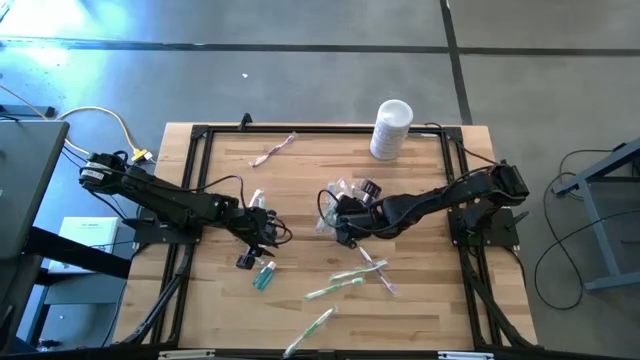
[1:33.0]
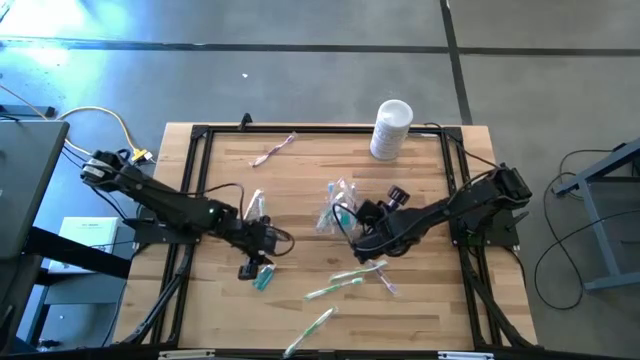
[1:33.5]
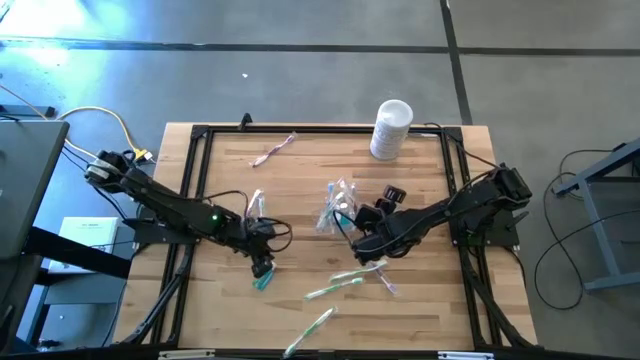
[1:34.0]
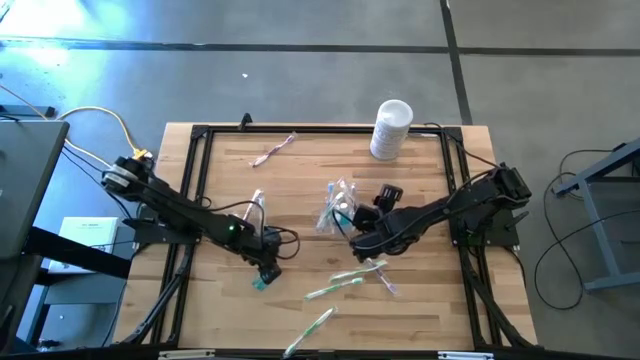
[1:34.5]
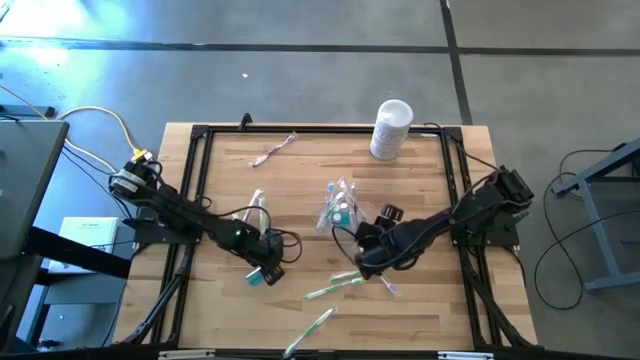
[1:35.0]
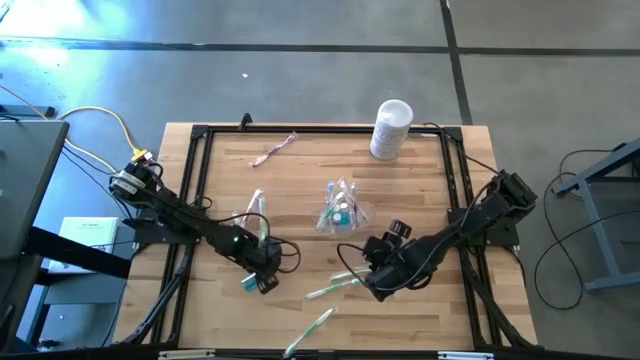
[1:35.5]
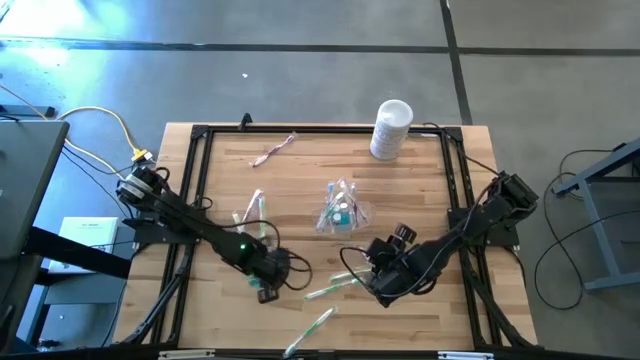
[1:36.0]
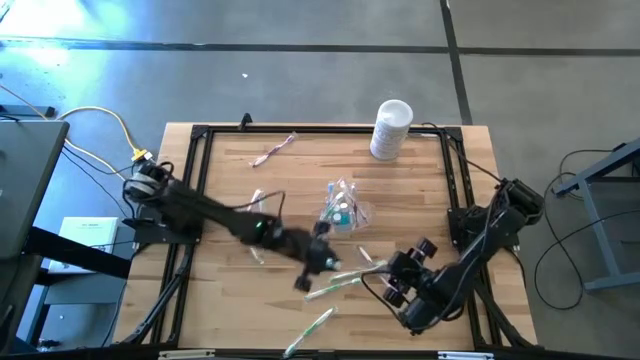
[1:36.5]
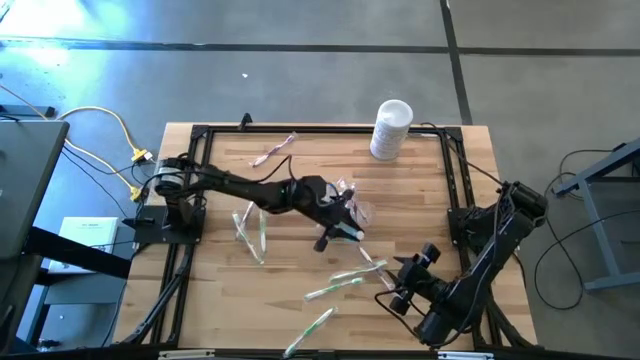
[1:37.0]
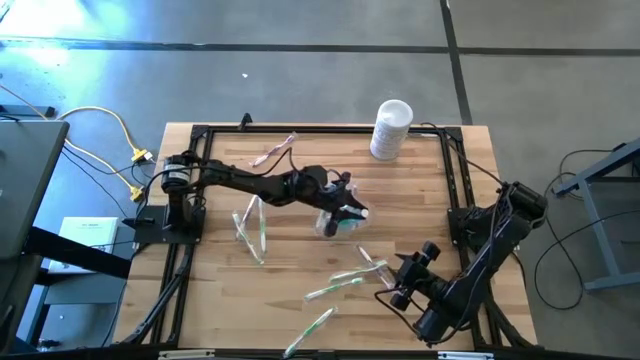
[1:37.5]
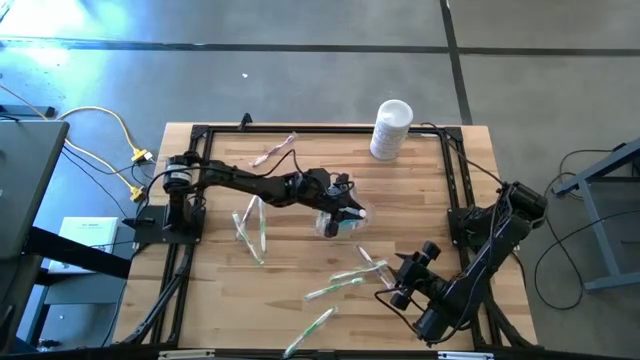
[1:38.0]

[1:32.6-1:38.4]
Task: Pick & Place toothbrushing station
Put the blue mouthwash bottle into the transparent organizer

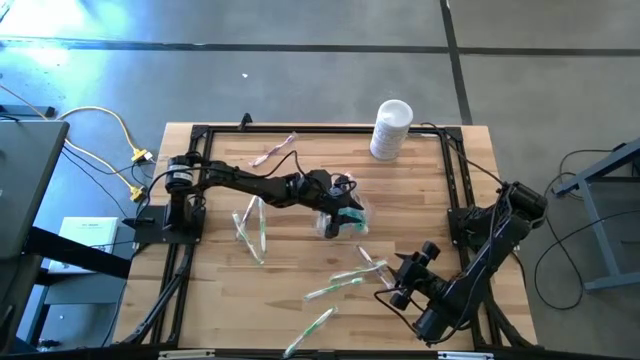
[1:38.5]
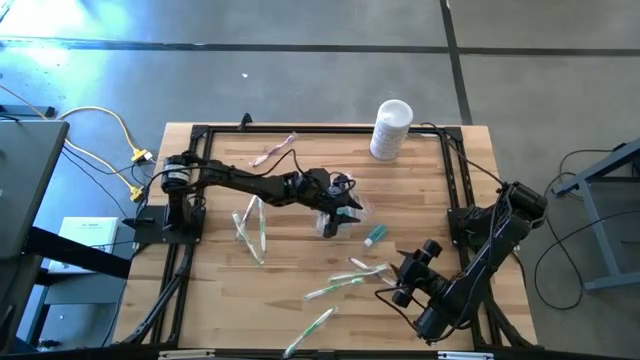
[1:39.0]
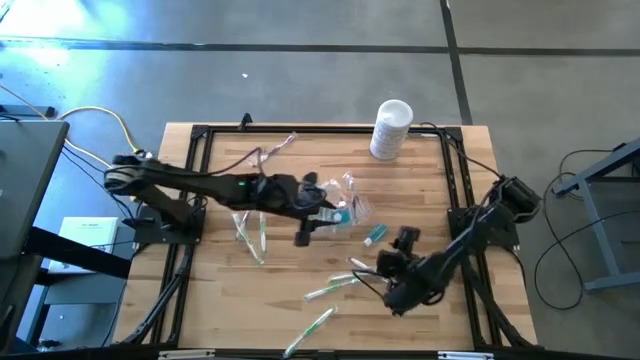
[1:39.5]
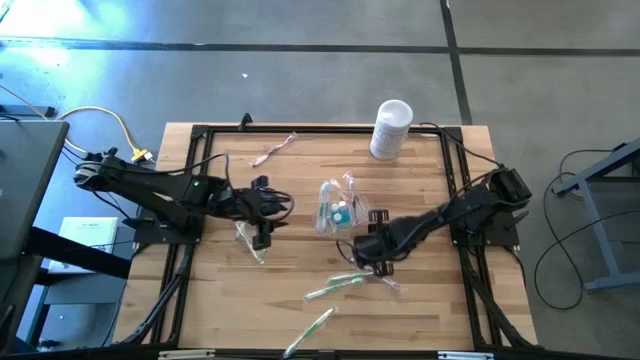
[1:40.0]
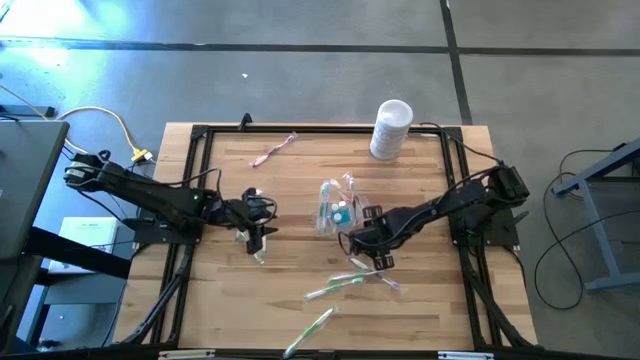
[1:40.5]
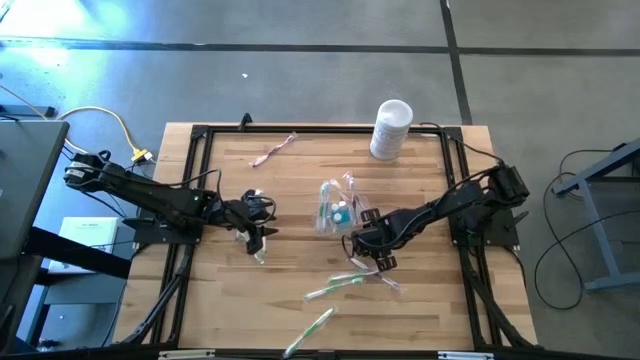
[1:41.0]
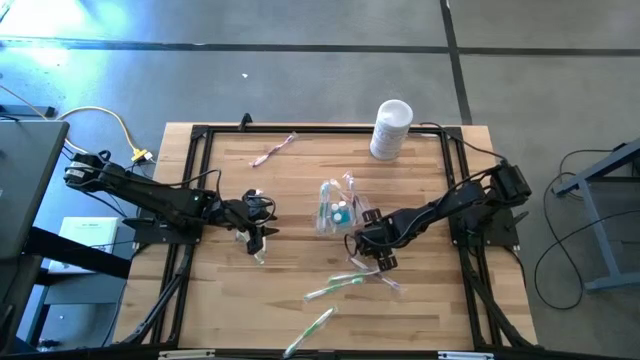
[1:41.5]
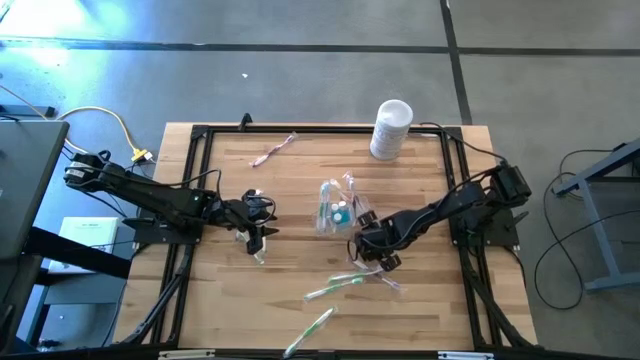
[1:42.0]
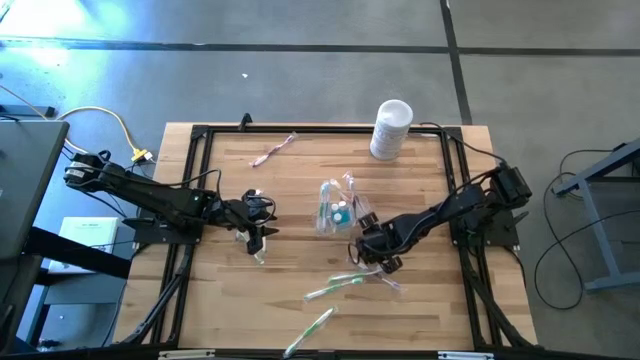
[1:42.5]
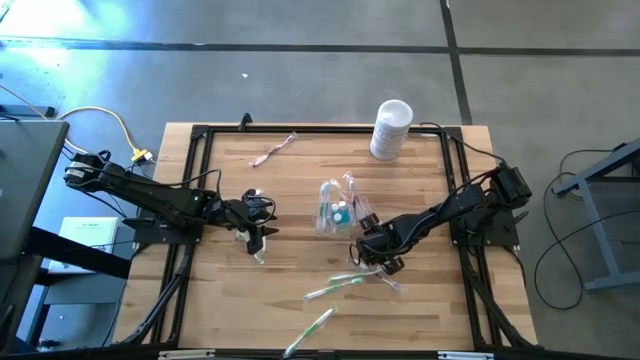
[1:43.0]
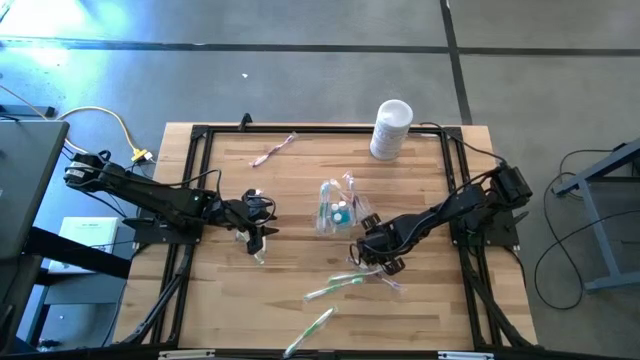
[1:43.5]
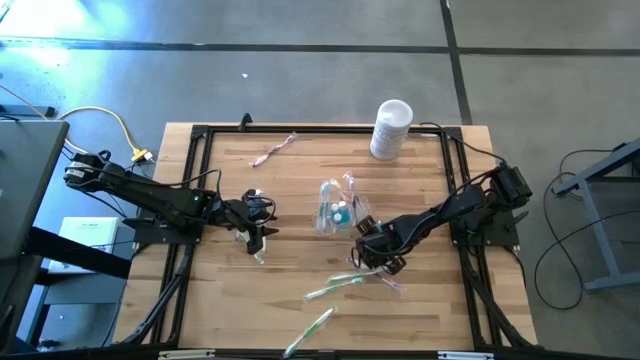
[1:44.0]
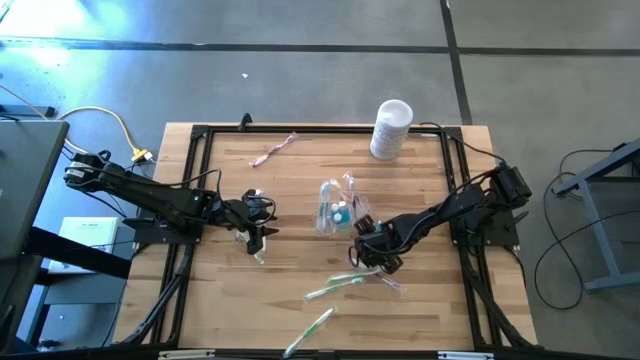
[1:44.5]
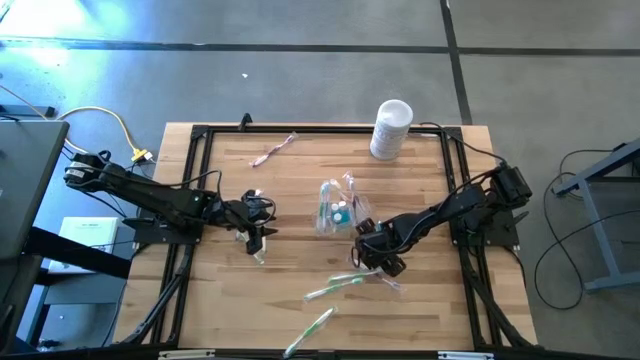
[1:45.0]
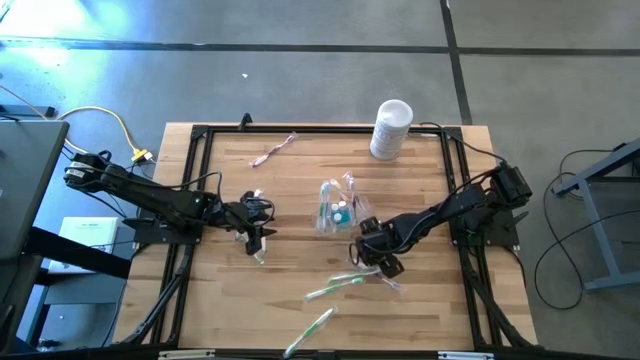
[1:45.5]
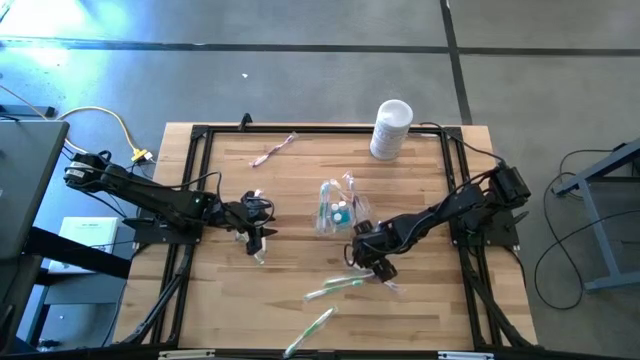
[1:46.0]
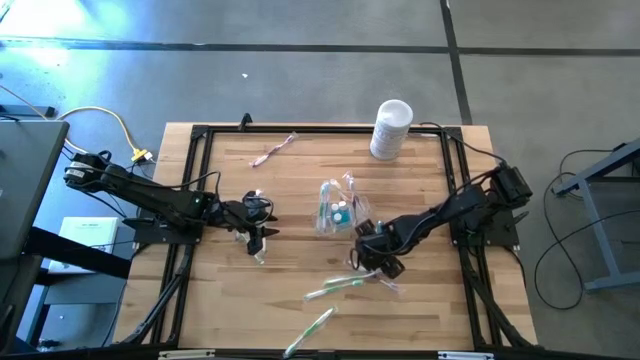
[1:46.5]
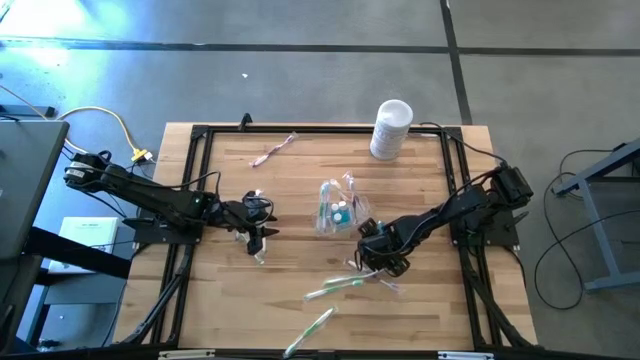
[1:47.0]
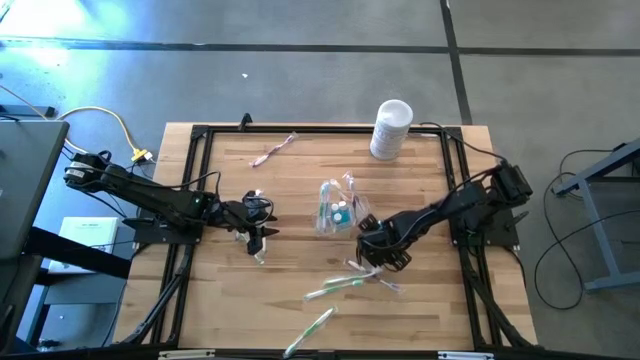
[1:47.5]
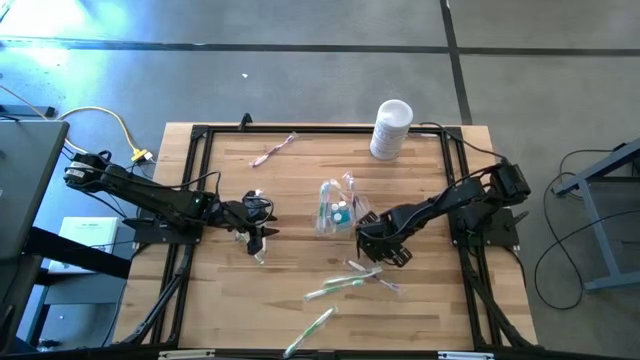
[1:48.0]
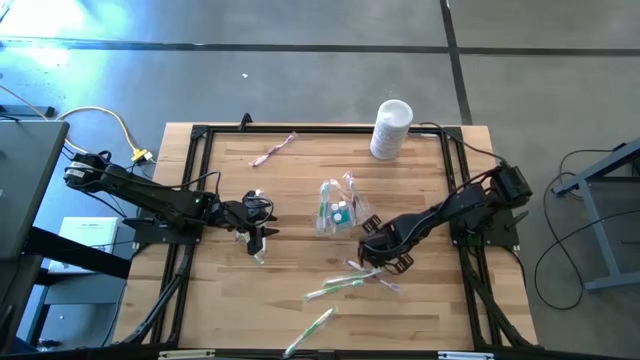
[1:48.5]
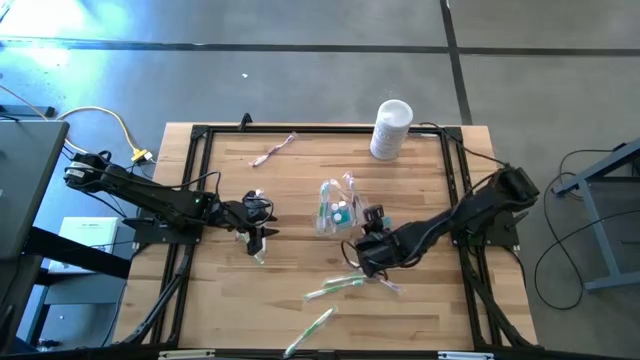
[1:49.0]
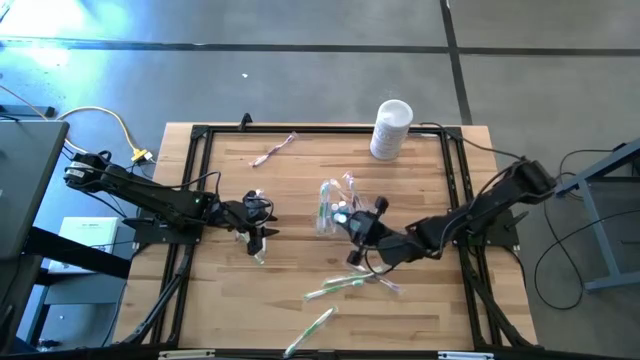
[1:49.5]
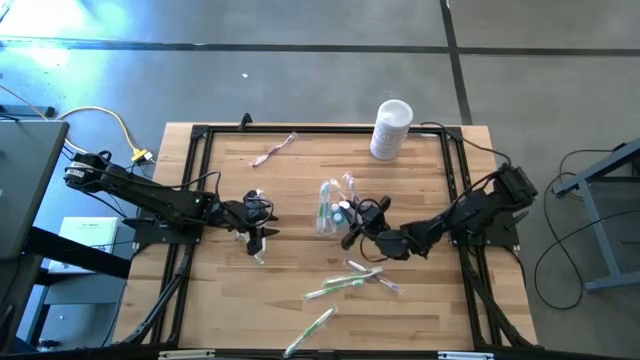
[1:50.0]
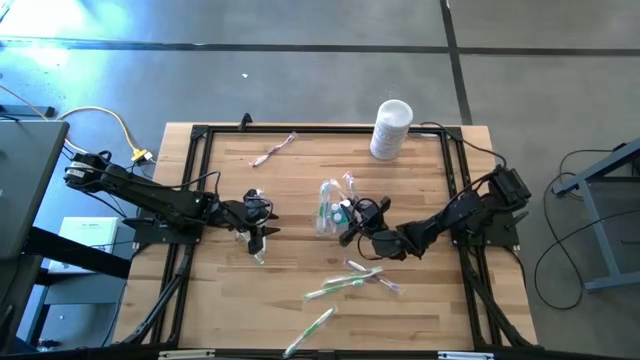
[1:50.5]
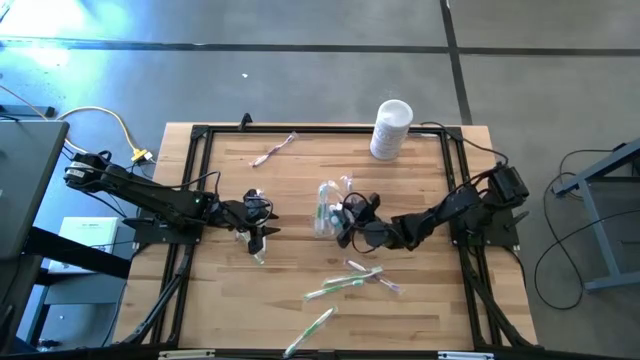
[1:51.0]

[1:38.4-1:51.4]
Put the blue mouthwash bottle into the transparent organizer

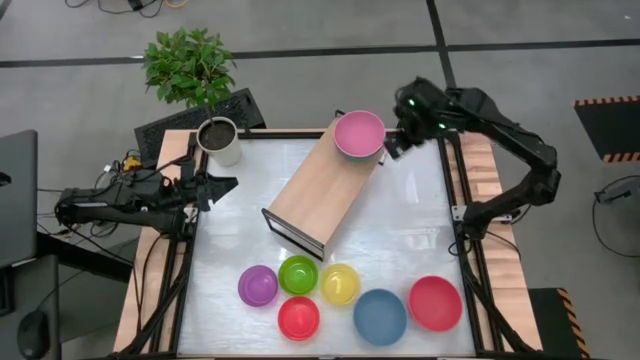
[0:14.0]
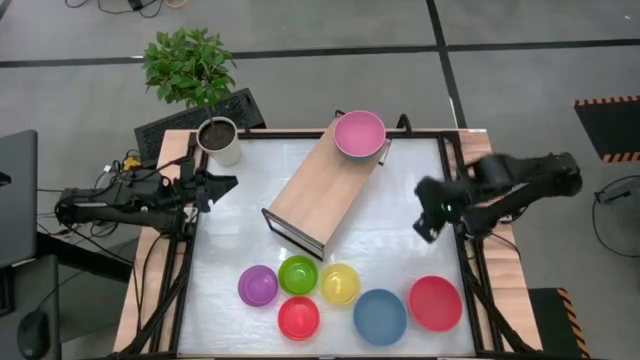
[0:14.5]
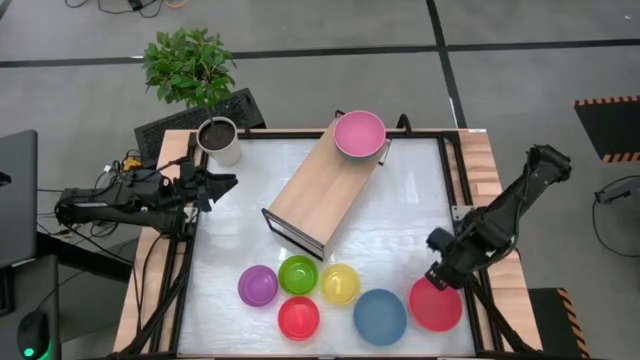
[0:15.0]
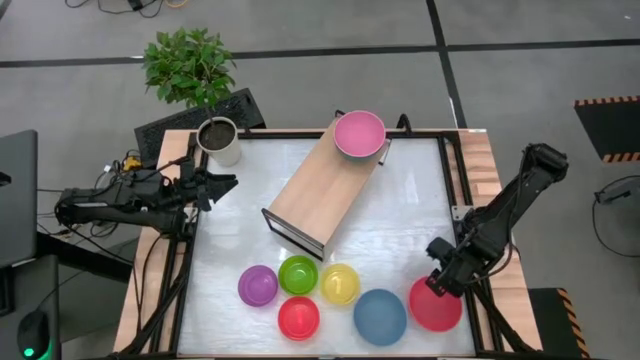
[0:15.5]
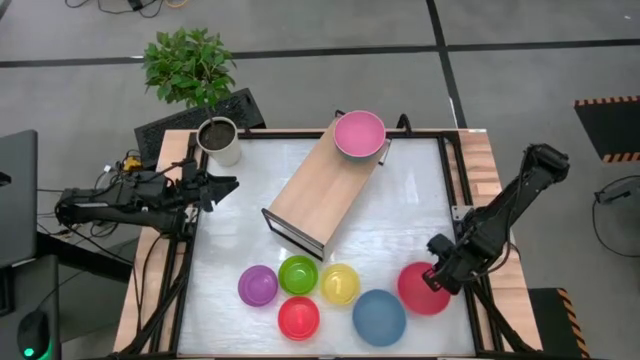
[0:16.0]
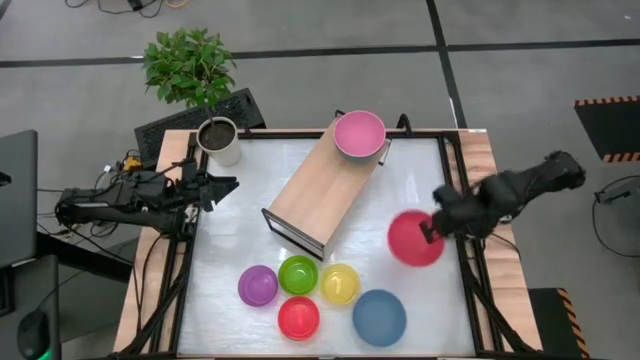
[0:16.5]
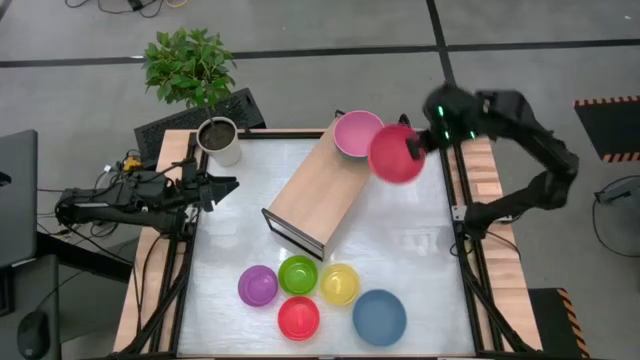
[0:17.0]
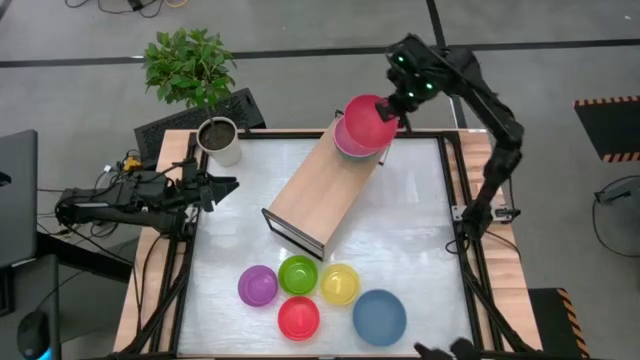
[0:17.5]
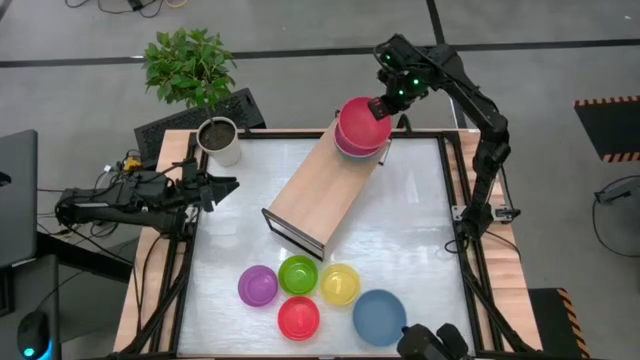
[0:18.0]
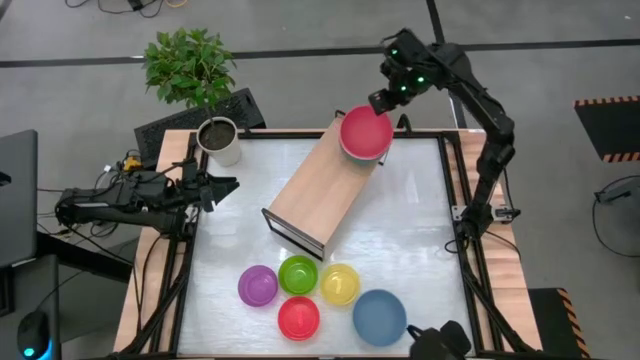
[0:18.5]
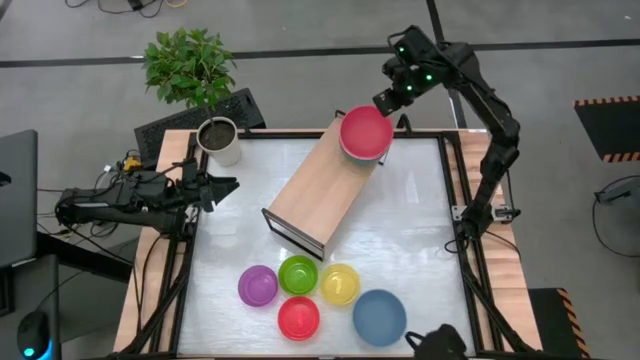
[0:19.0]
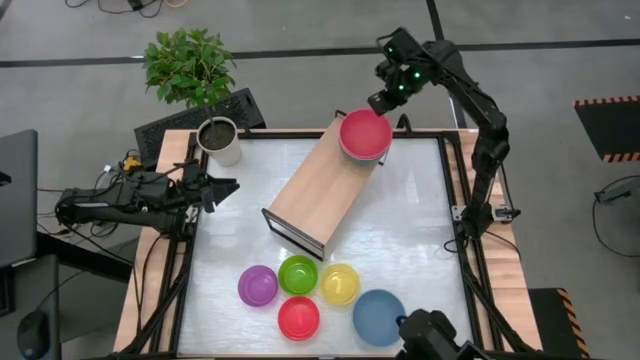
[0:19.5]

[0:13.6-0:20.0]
Task: Place and stack bowls onto a shelf
Stack the large orange bowl on the pink bowl
